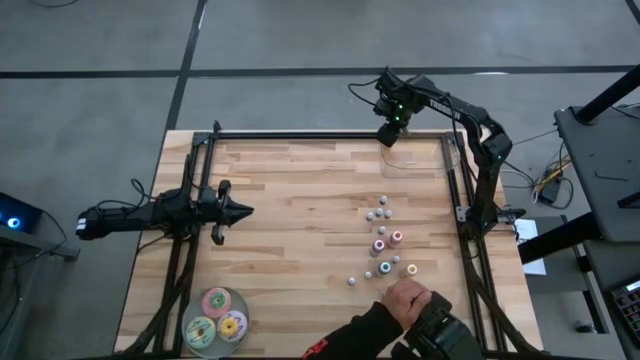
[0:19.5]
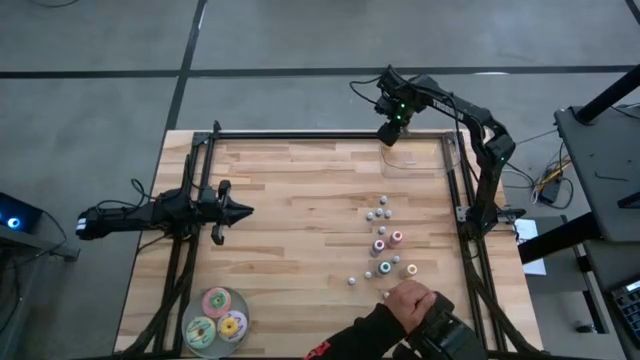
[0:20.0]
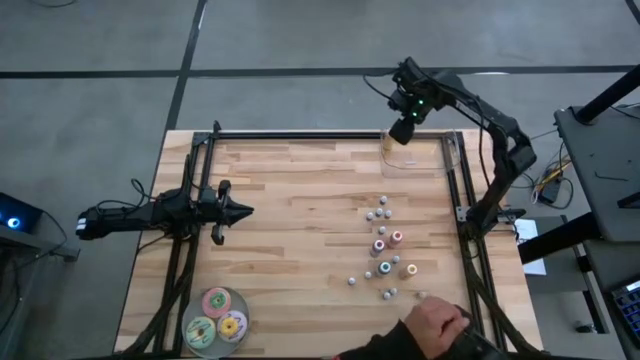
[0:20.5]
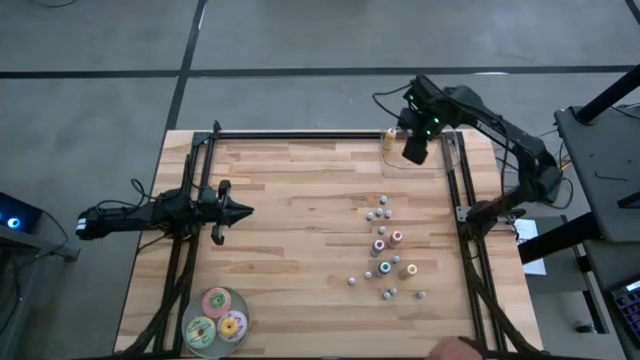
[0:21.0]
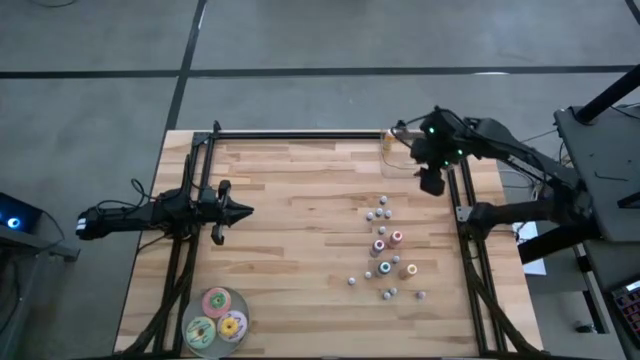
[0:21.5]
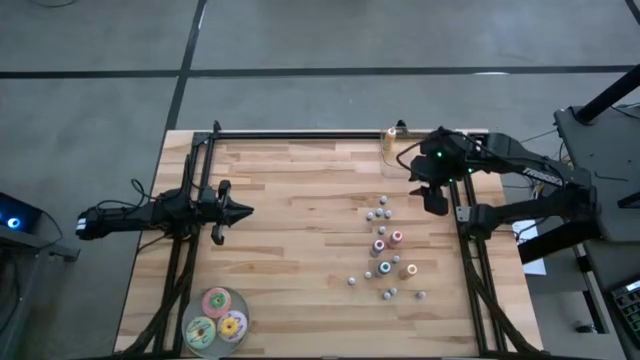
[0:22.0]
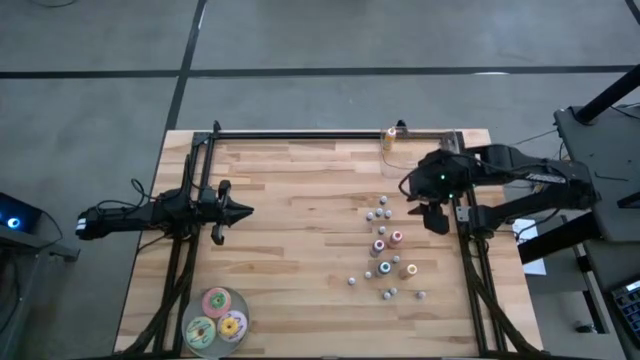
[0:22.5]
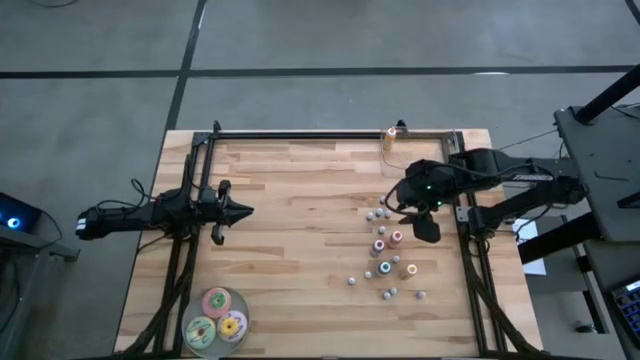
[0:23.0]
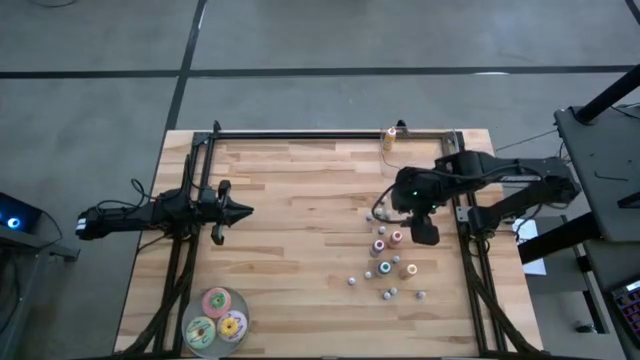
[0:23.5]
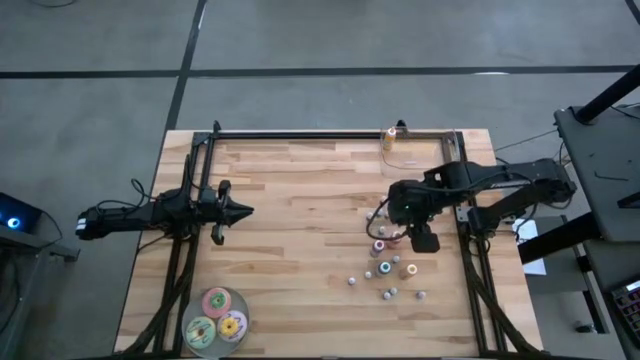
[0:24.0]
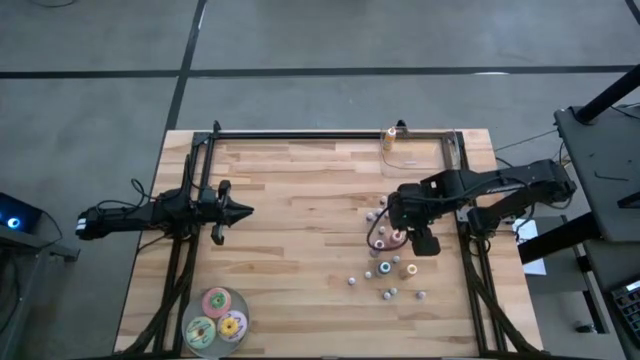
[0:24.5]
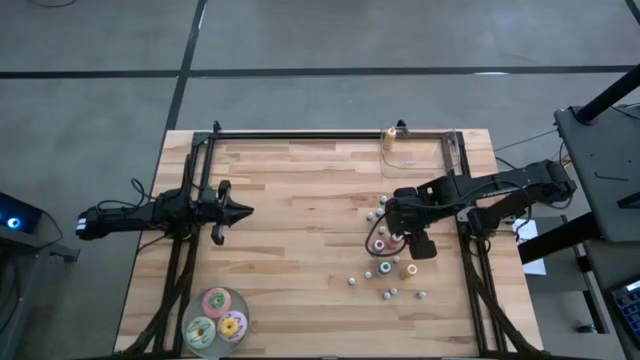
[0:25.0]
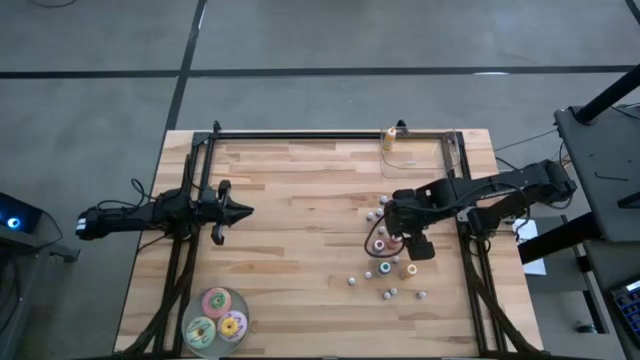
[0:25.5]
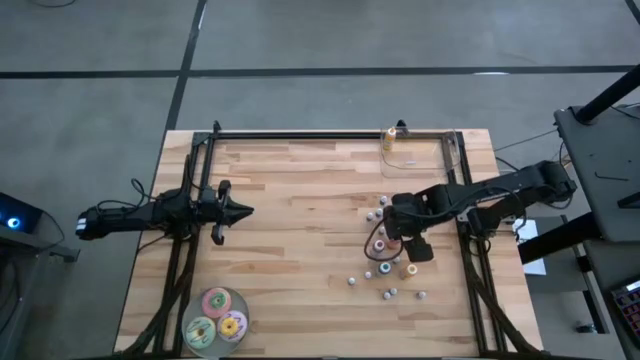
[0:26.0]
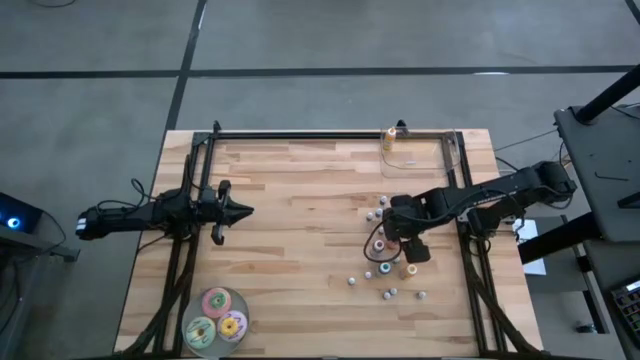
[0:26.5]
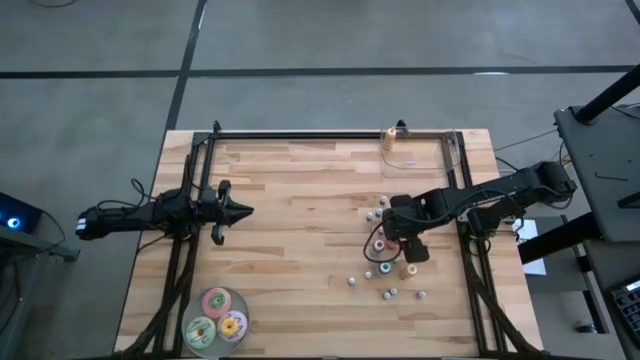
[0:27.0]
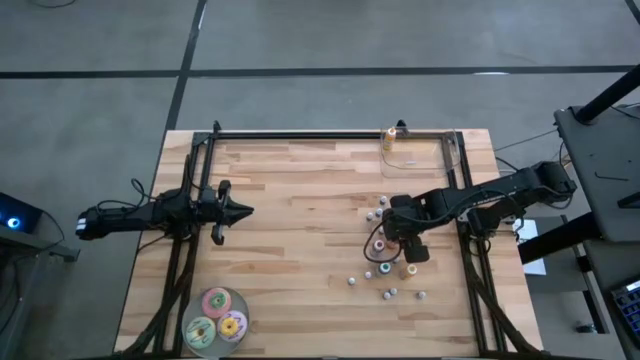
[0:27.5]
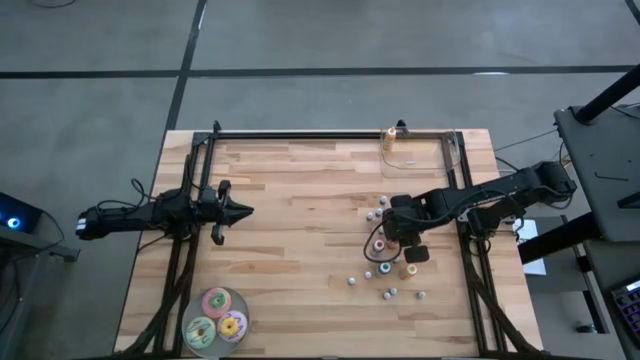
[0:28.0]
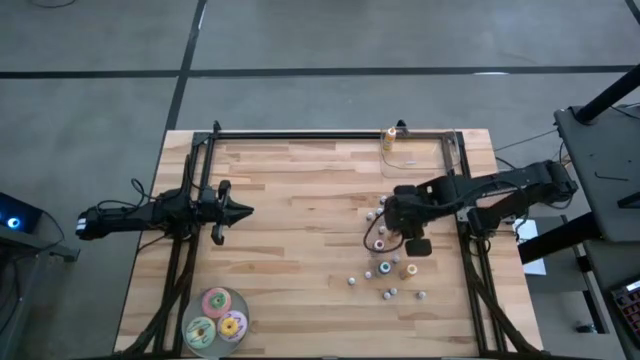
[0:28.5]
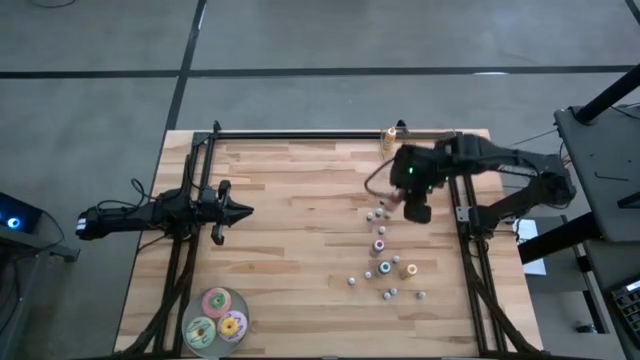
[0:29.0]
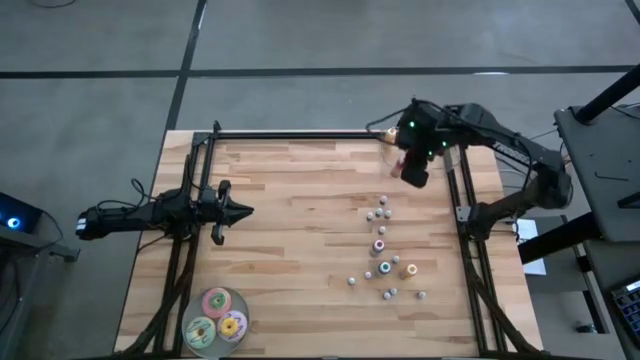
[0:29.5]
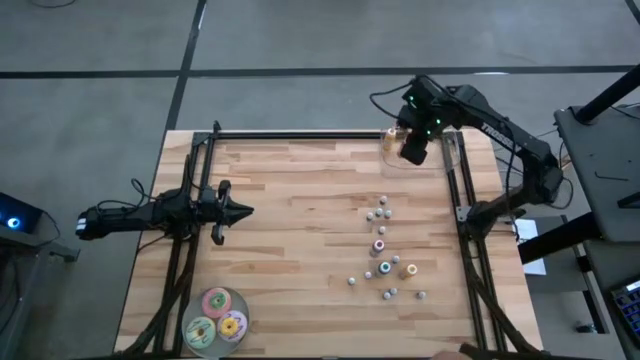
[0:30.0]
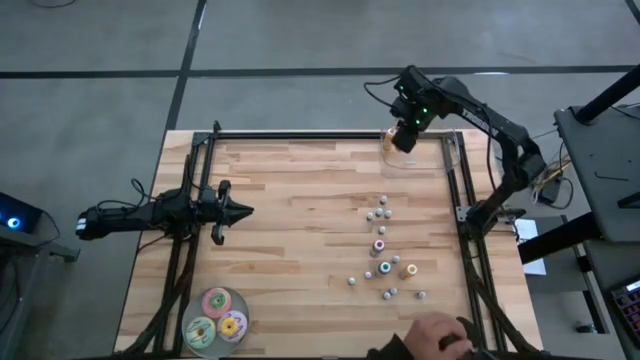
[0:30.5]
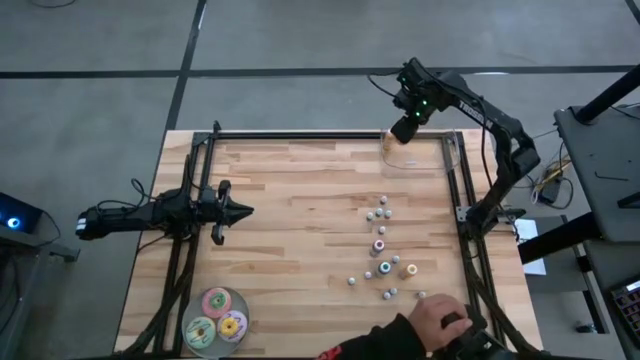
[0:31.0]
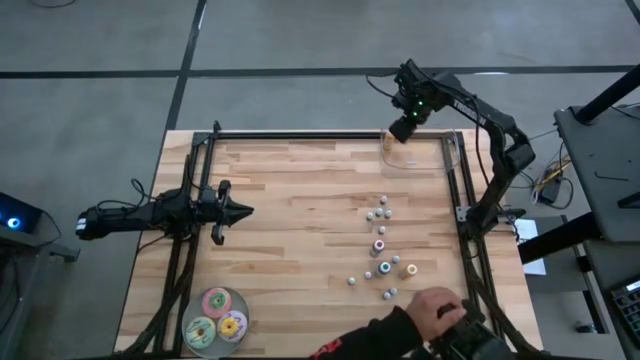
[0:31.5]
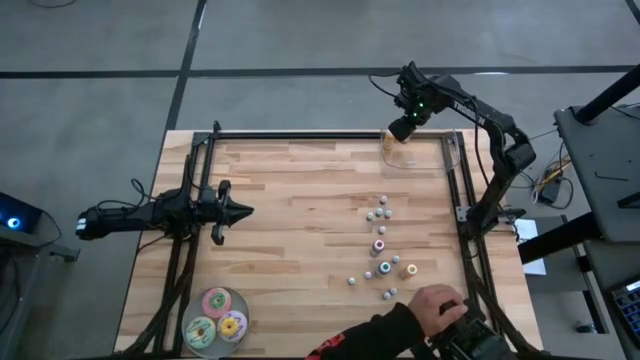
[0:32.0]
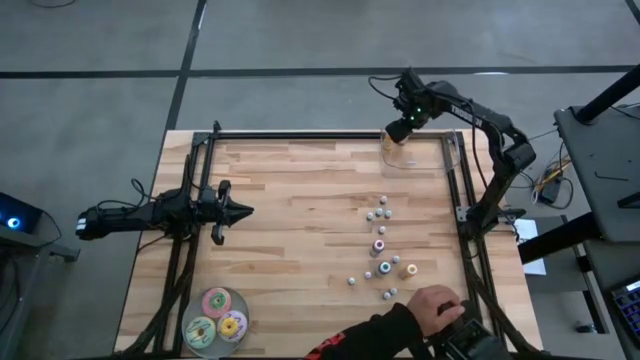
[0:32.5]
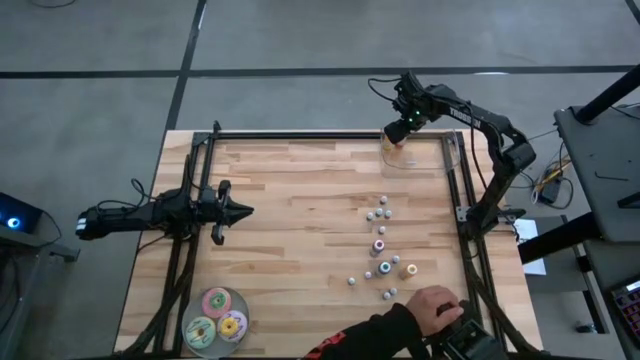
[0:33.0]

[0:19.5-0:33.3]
Task: Pick & Place food coloring
Put the big orange food coloring bottle into the bin

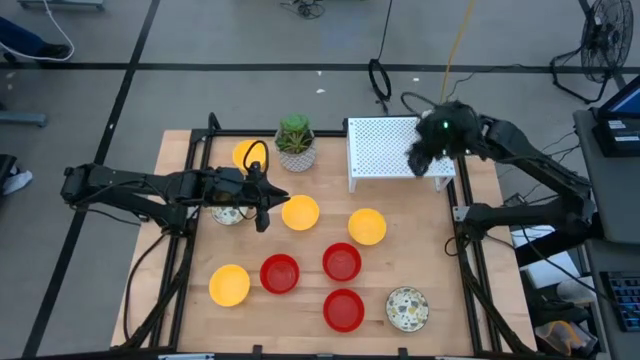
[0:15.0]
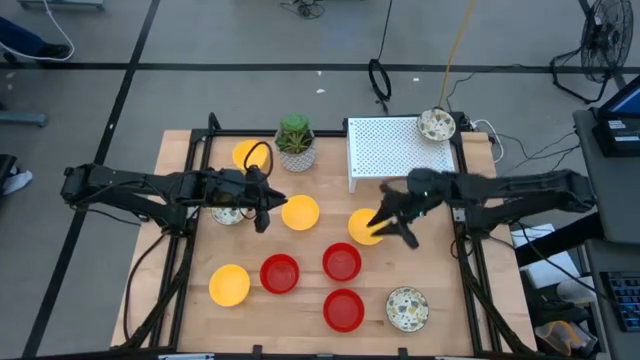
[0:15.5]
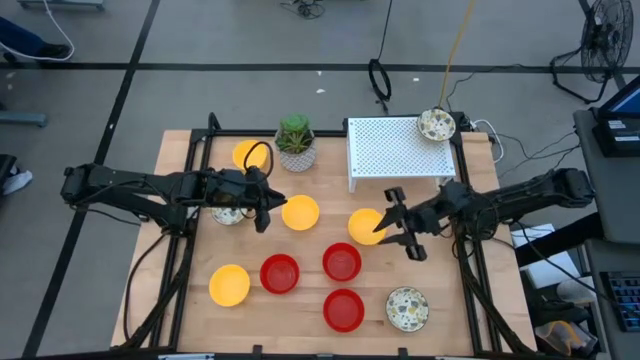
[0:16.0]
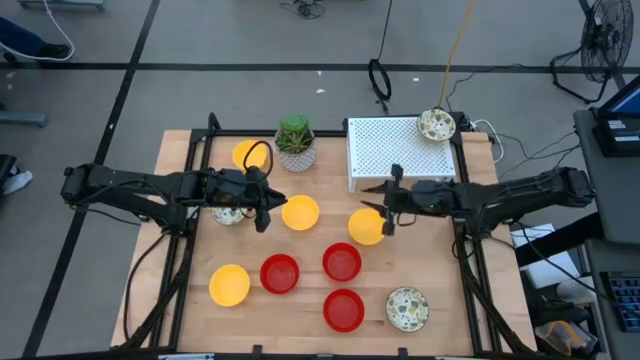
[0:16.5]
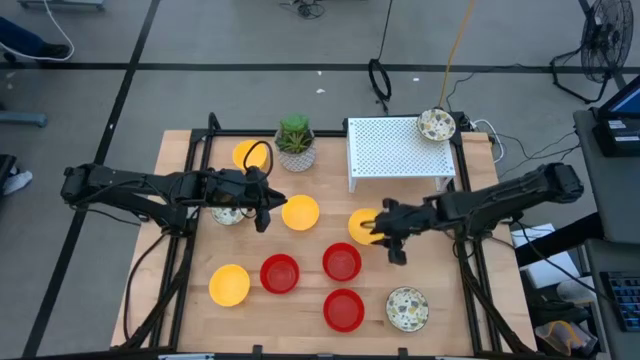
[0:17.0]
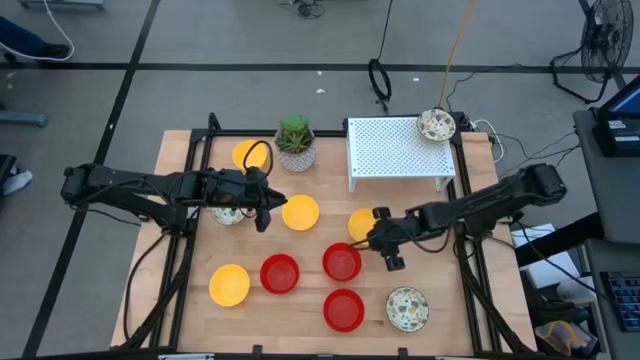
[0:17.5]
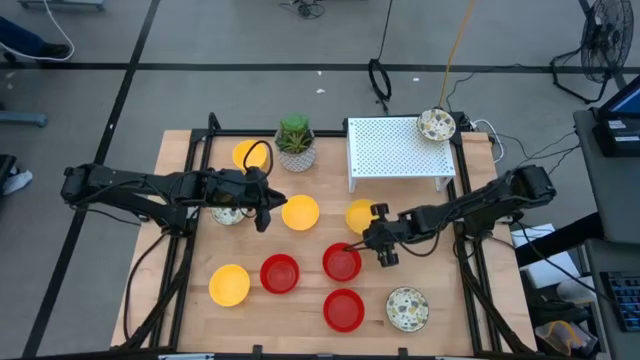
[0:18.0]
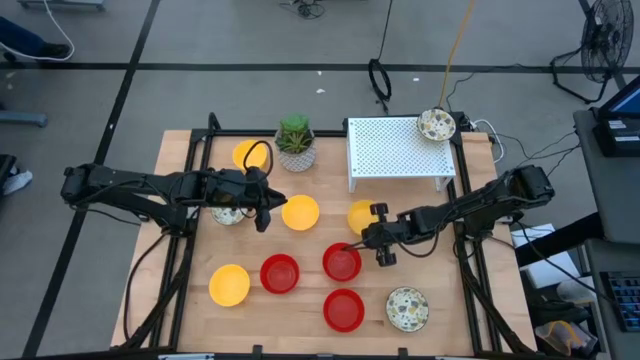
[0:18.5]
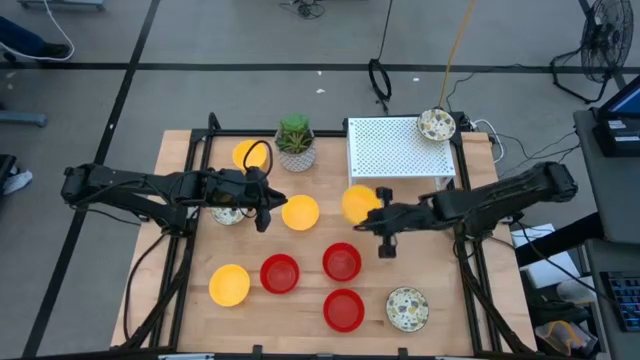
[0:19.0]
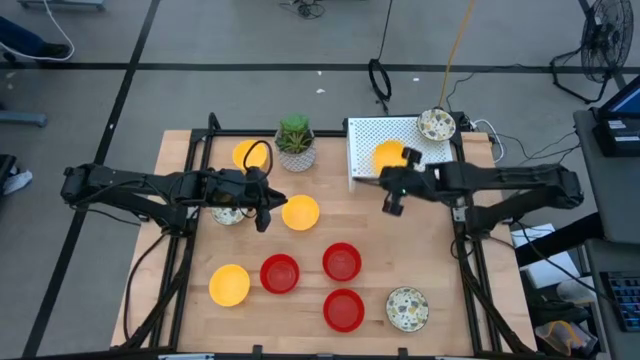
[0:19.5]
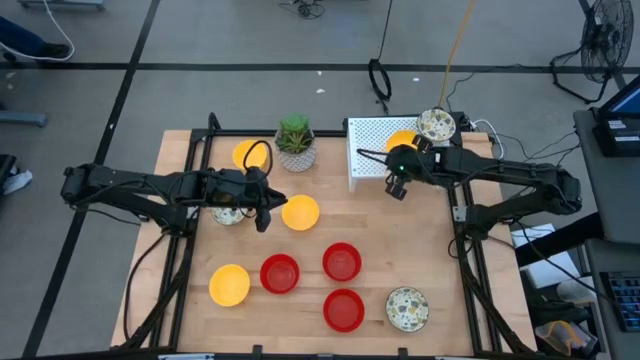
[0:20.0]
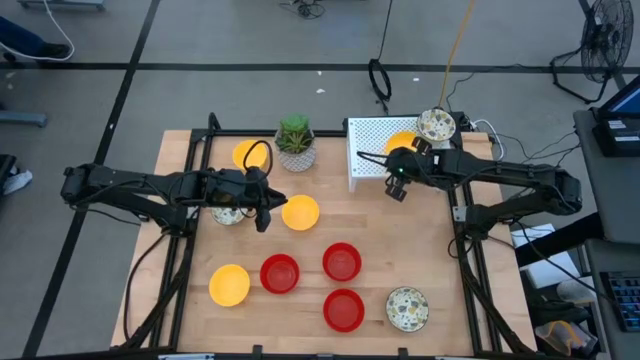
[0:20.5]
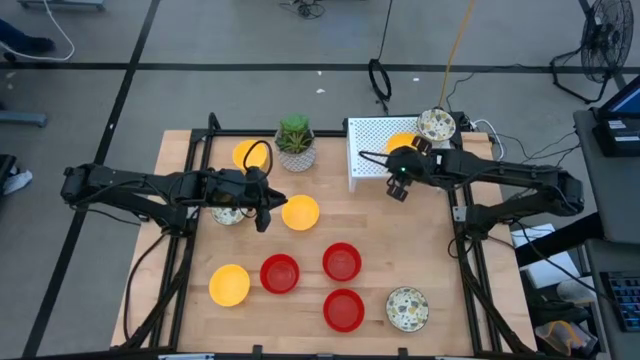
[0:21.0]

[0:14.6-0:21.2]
Task: Pick & Place Mini bowls
Put the yellow bowl on the shelf
